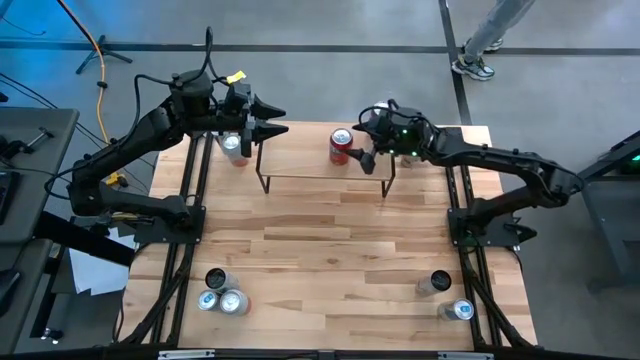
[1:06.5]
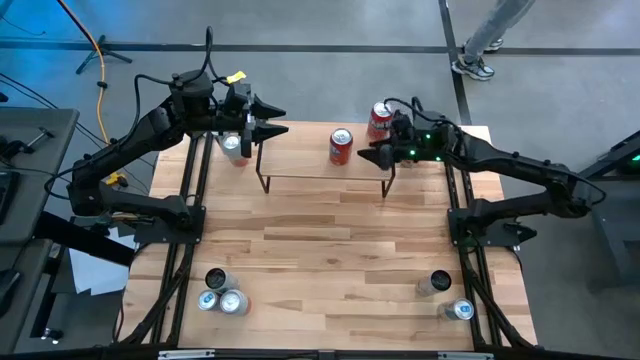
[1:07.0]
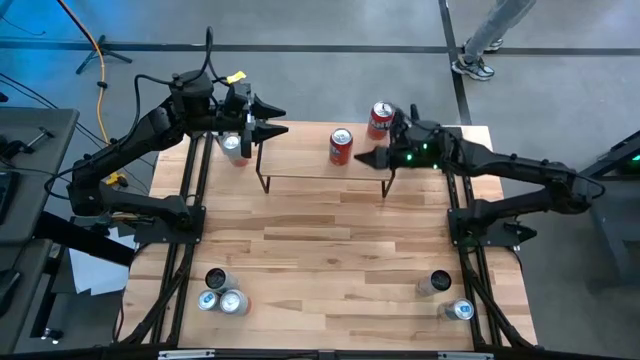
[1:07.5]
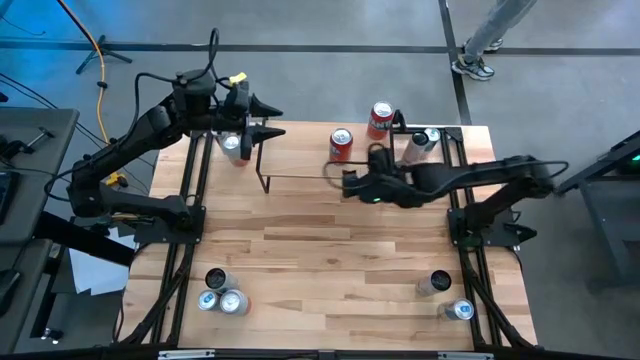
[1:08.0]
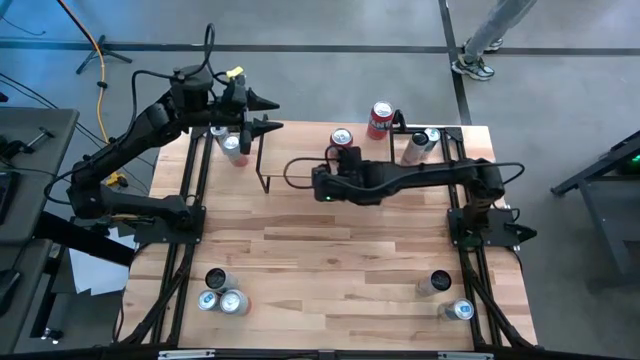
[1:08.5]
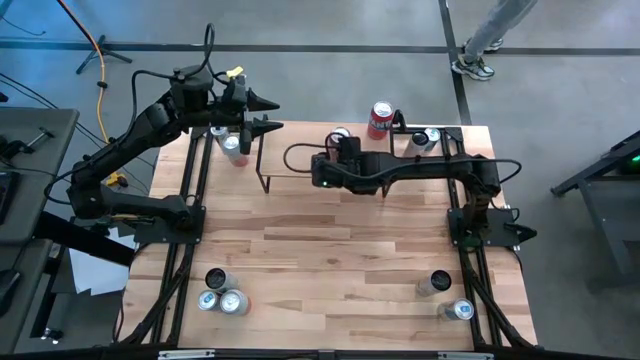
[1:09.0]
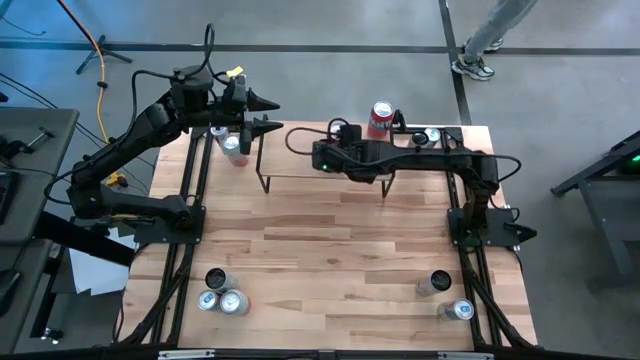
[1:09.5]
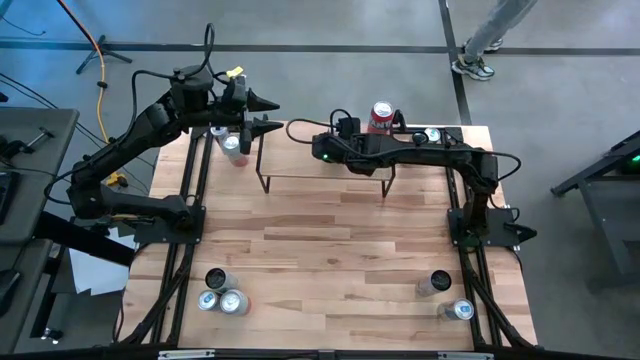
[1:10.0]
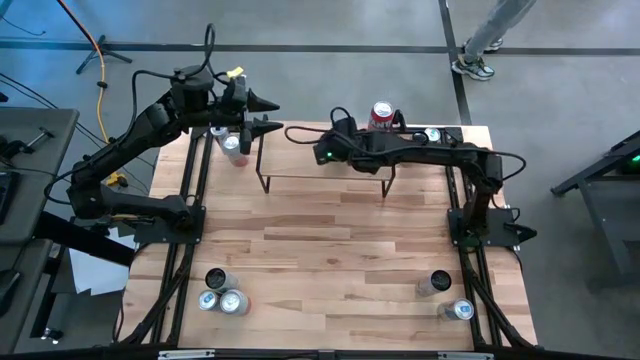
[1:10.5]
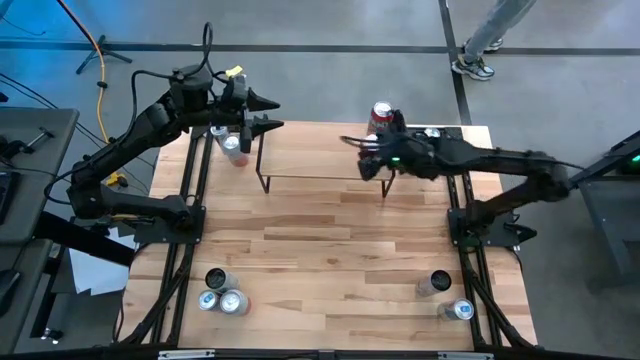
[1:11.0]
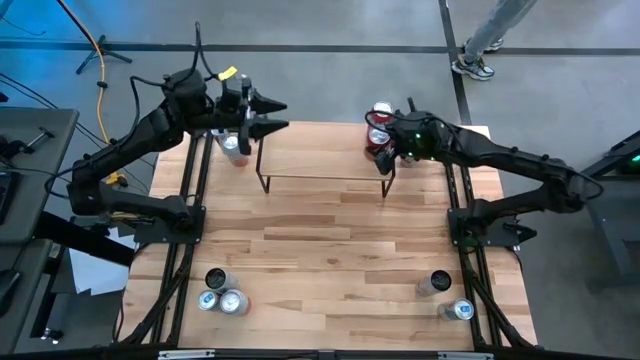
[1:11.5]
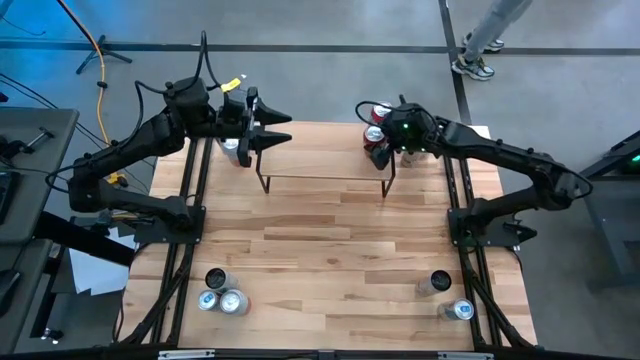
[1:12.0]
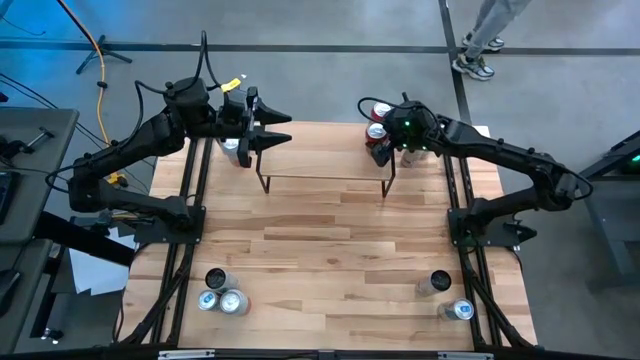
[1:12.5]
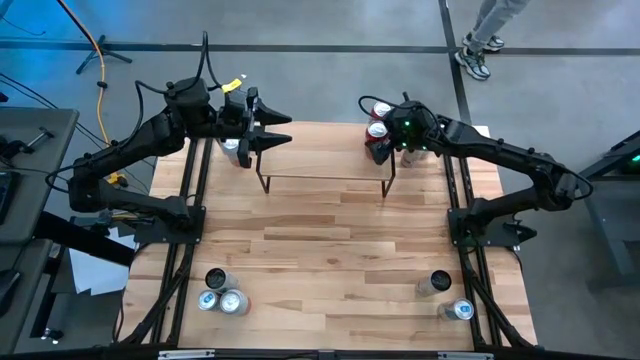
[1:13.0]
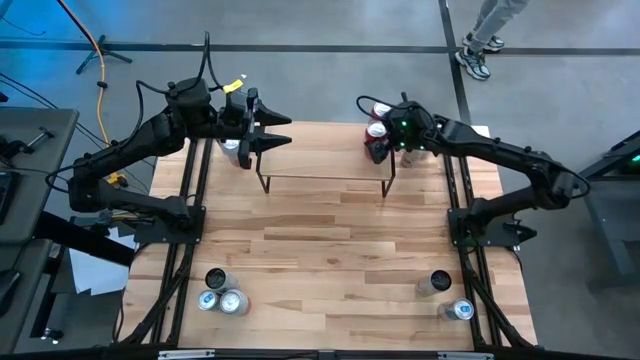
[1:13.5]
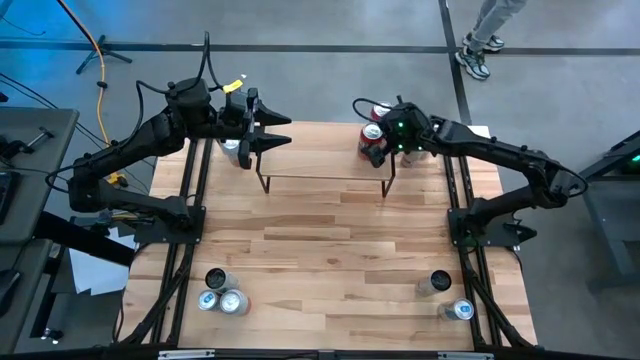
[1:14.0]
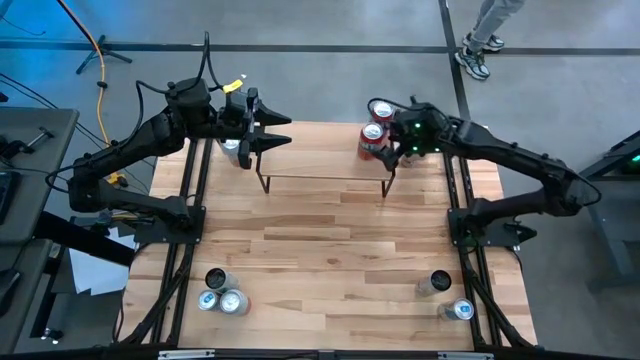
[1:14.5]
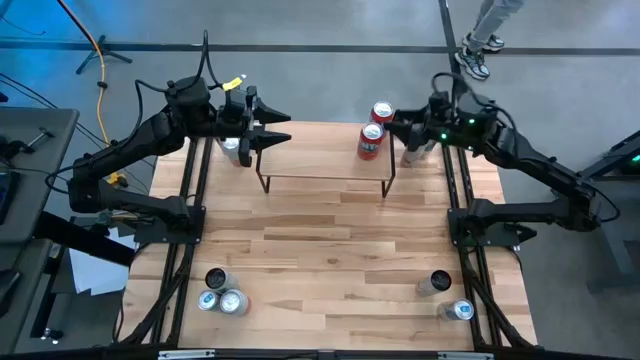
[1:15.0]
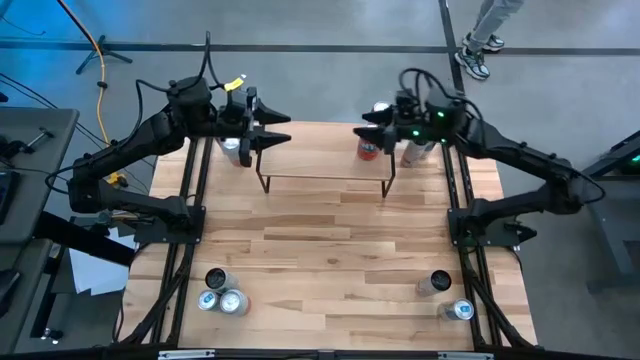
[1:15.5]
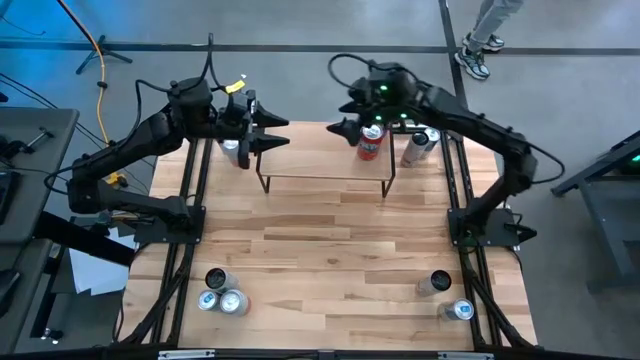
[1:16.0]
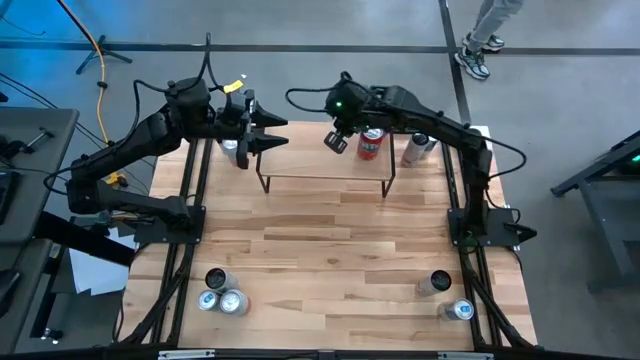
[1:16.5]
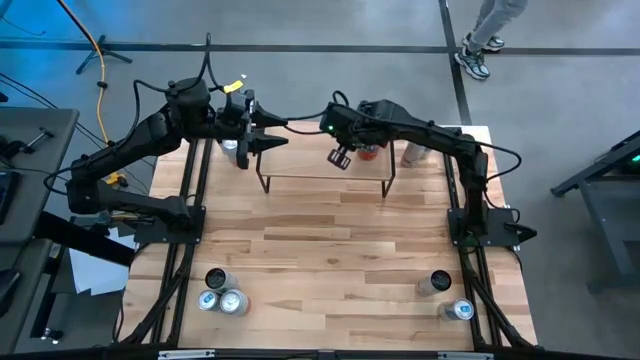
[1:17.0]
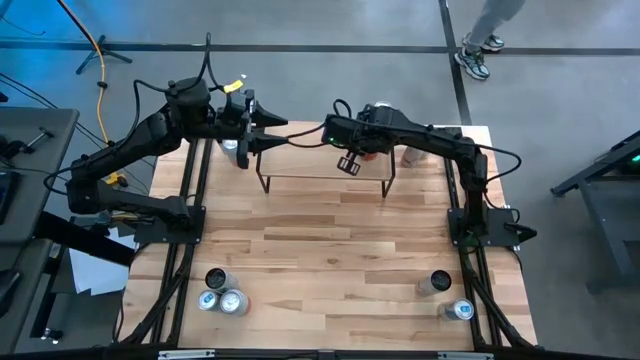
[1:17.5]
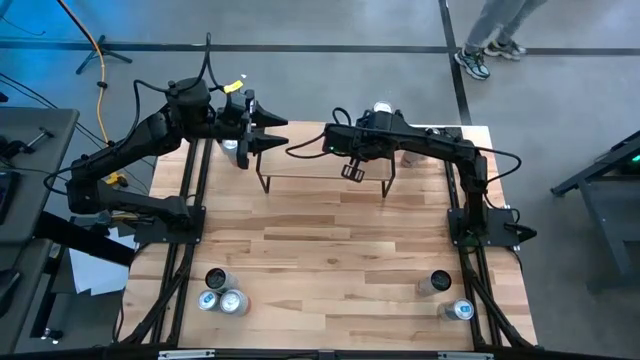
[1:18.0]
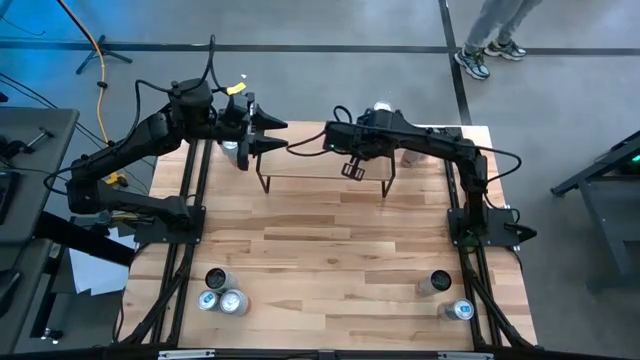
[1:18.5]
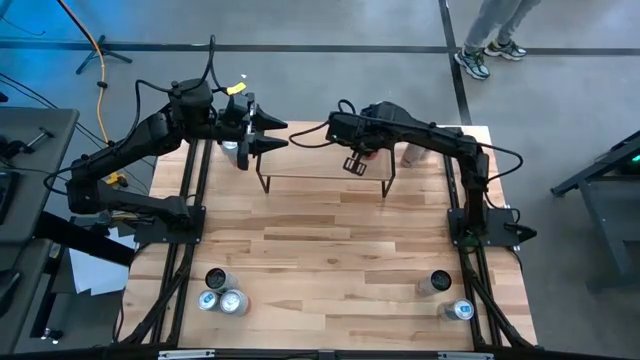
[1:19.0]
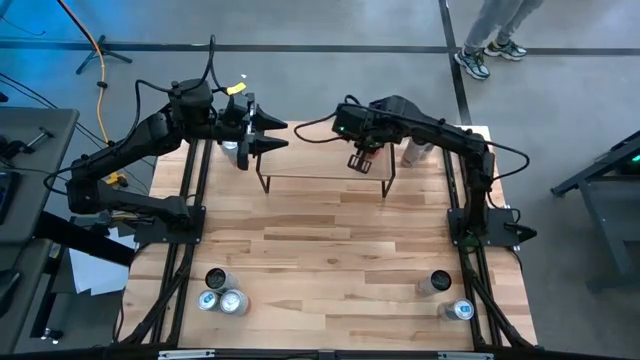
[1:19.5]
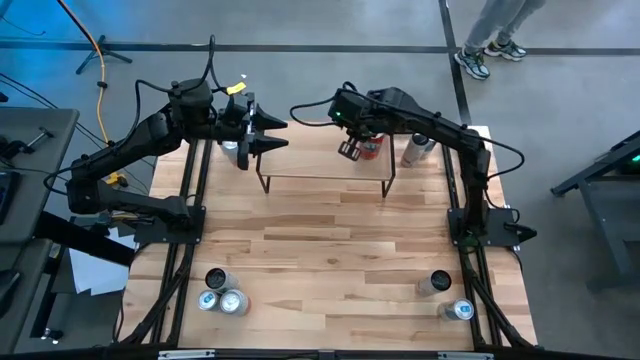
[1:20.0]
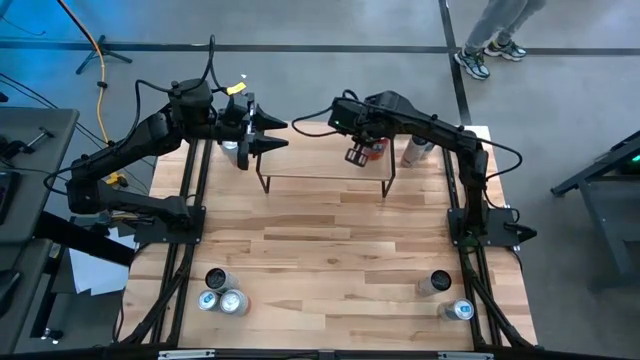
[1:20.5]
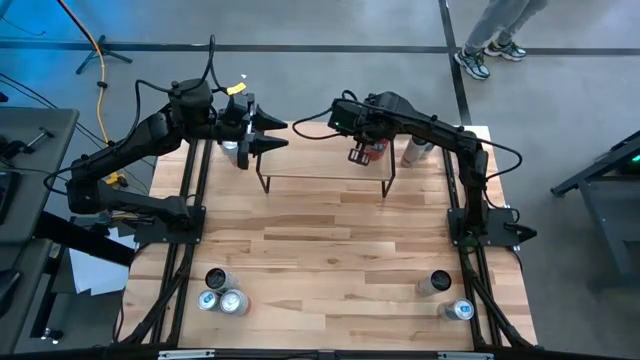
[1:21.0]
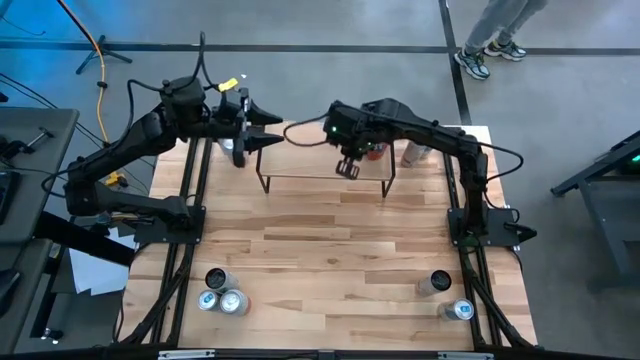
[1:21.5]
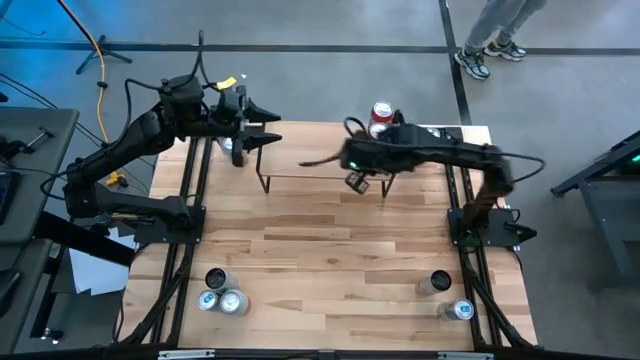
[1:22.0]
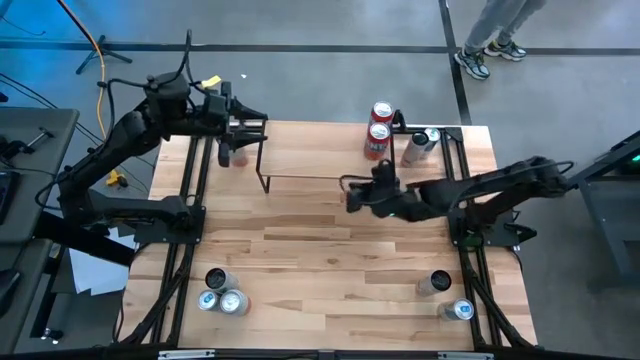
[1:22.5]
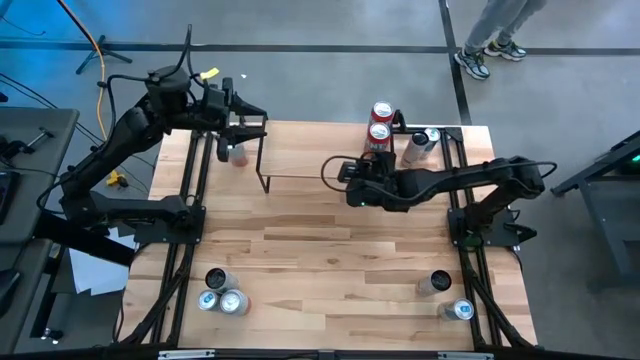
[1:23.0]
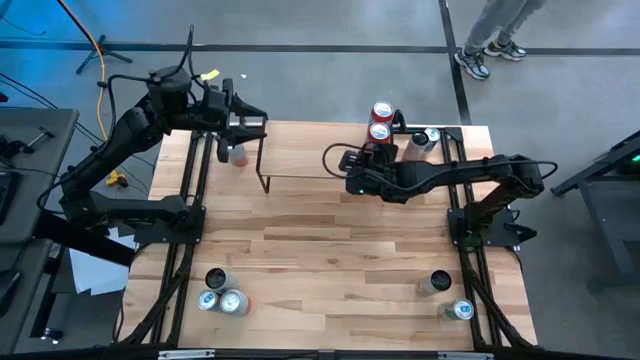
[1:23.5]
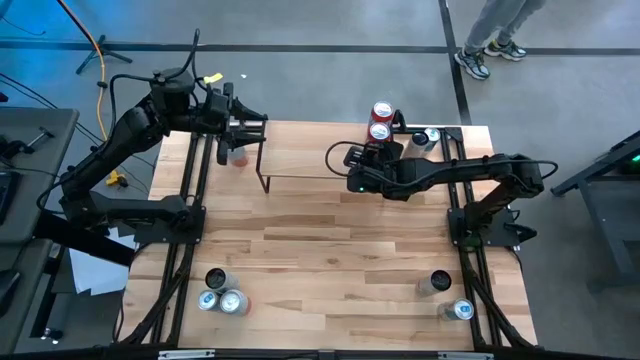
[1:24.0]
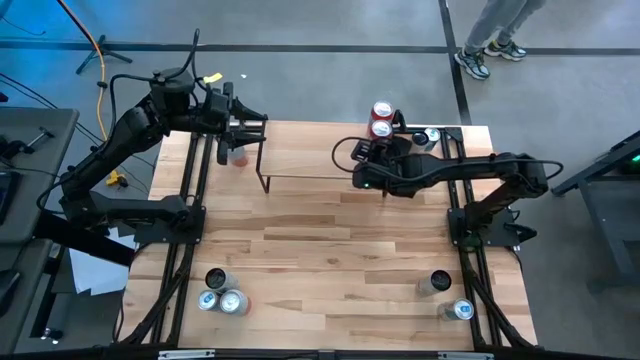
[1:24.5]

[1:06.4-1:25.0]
Task: Place canned beverage on shelf
Put the red soda can on the shelf aligned with the red soda can

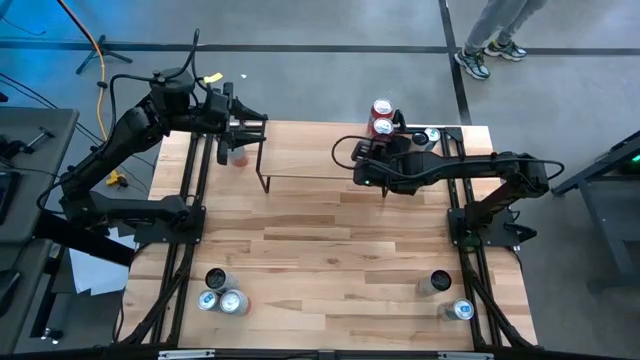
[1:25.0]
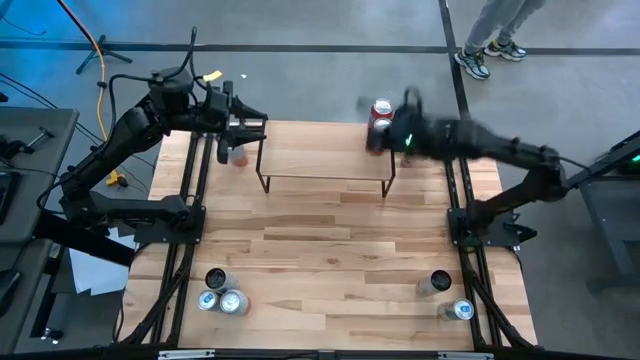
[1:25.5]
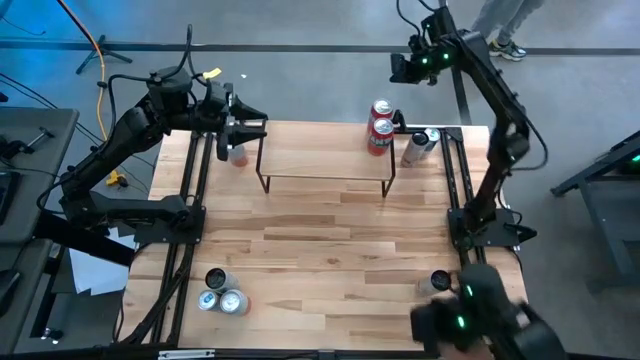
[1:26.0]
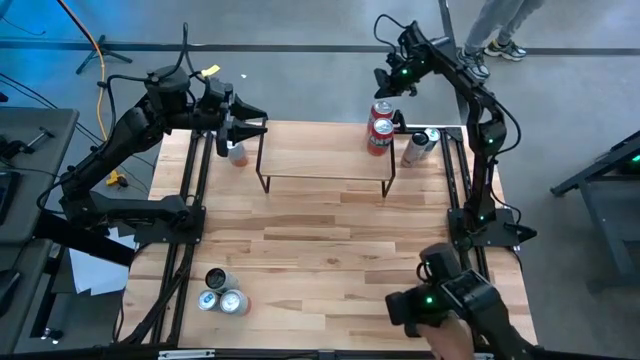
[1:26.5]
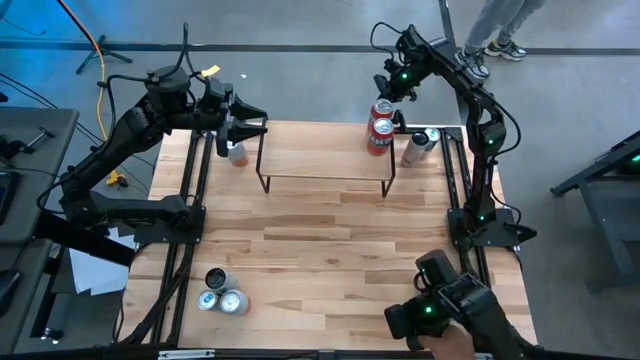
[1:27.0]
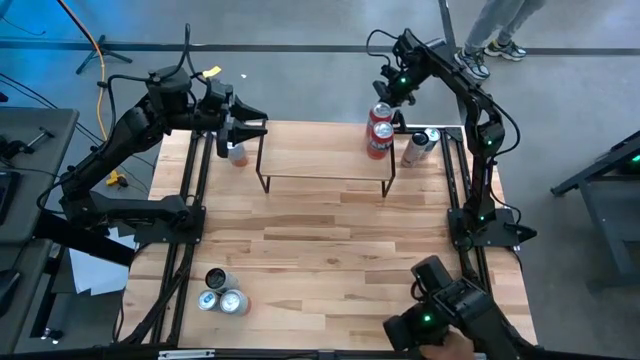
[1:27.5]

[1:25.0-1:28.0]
Adjust the red soda cans on the shelf
